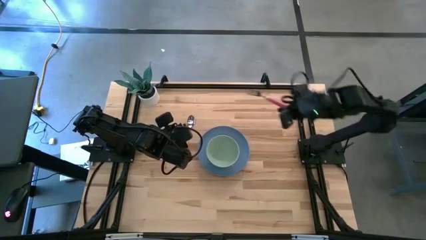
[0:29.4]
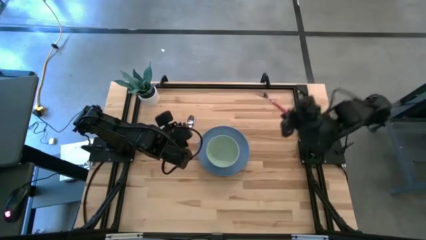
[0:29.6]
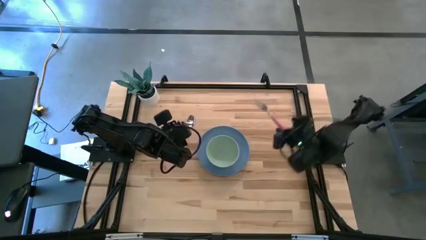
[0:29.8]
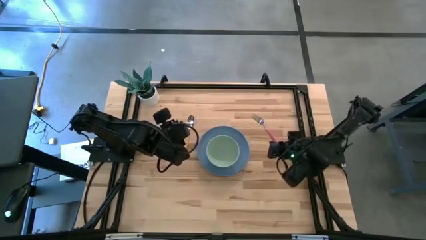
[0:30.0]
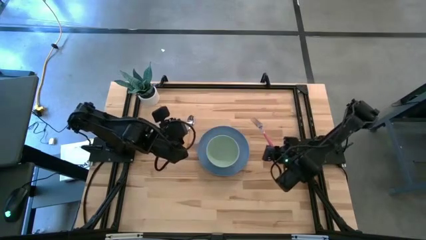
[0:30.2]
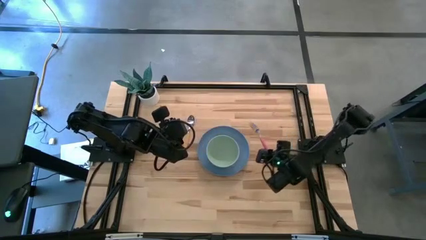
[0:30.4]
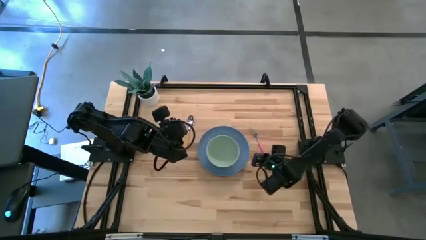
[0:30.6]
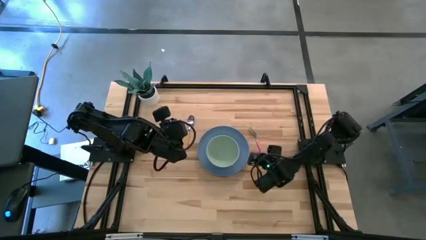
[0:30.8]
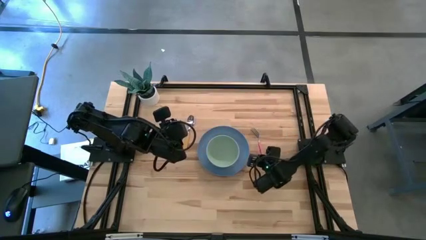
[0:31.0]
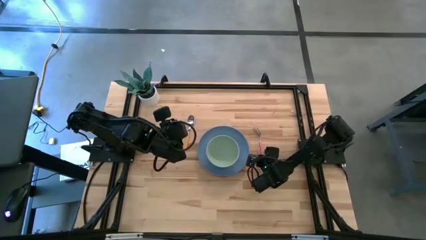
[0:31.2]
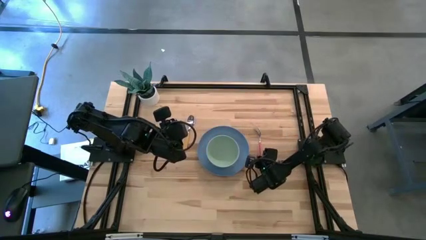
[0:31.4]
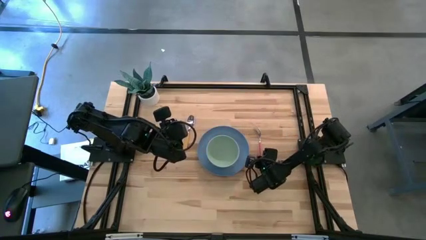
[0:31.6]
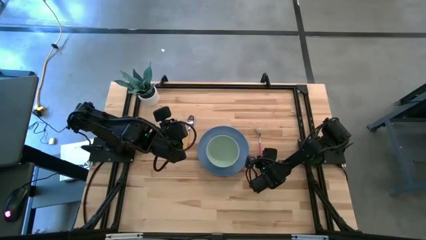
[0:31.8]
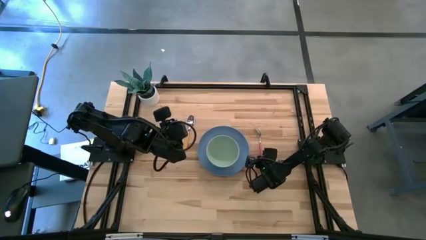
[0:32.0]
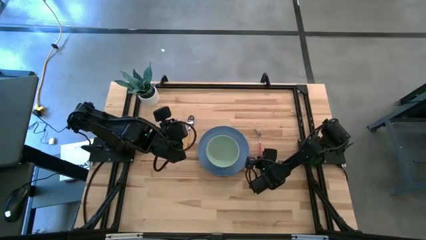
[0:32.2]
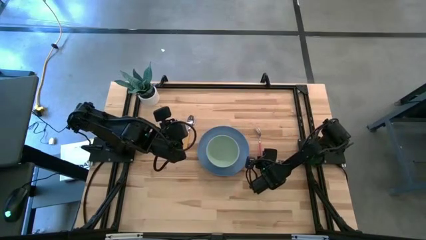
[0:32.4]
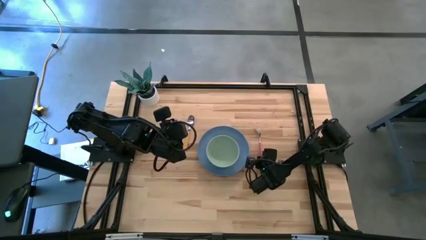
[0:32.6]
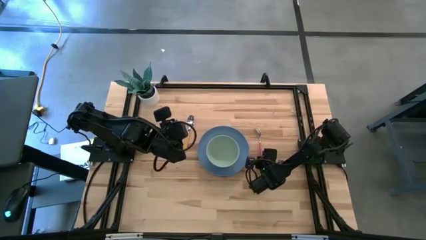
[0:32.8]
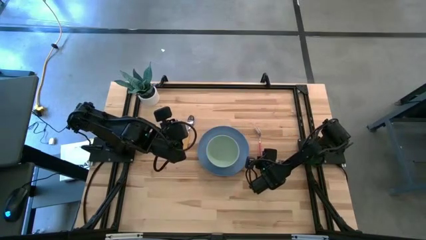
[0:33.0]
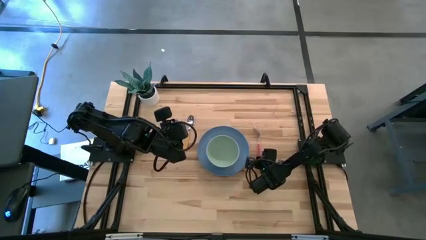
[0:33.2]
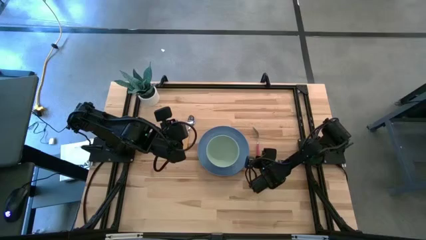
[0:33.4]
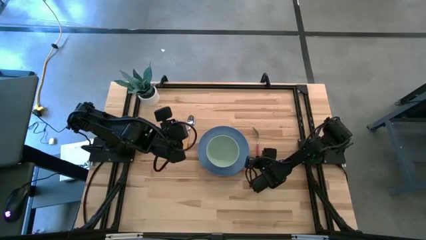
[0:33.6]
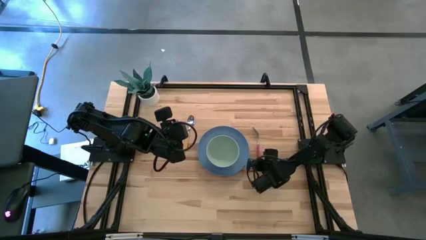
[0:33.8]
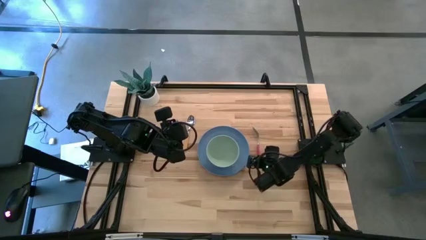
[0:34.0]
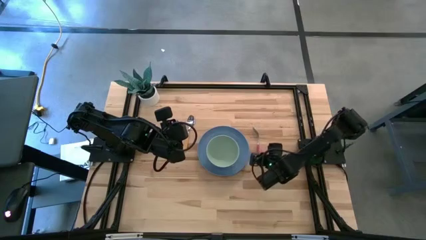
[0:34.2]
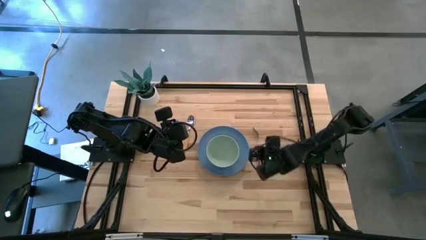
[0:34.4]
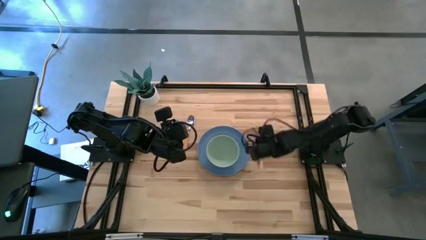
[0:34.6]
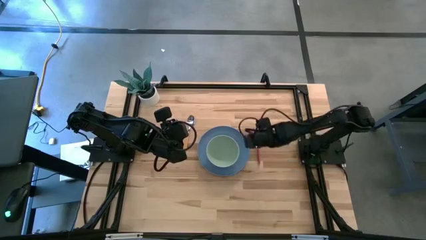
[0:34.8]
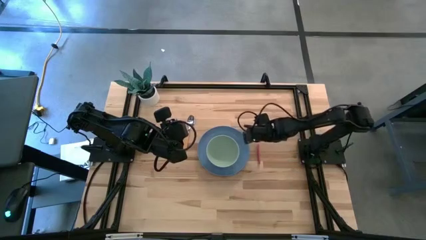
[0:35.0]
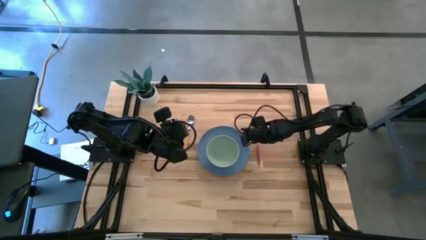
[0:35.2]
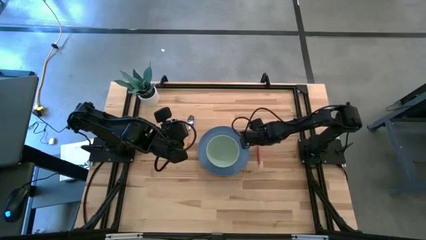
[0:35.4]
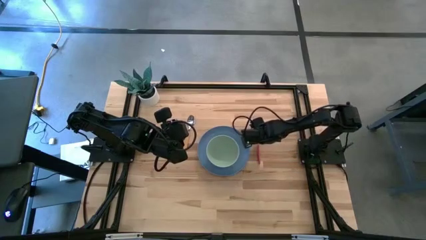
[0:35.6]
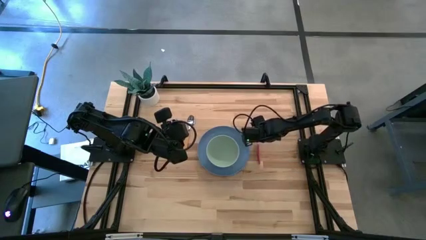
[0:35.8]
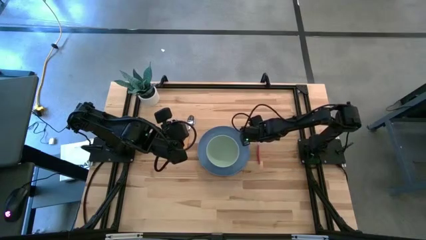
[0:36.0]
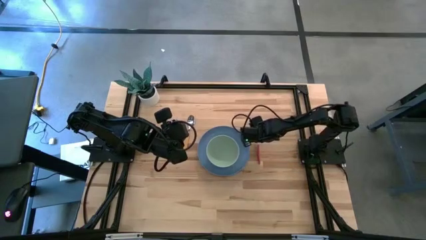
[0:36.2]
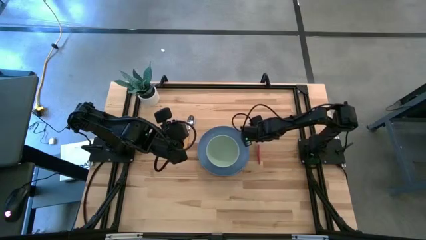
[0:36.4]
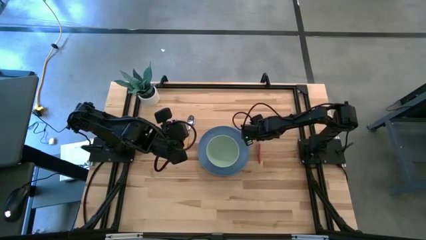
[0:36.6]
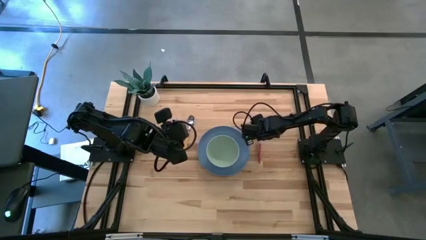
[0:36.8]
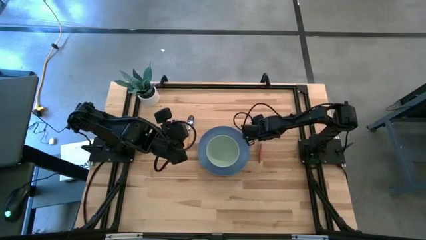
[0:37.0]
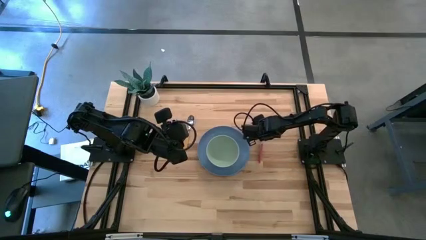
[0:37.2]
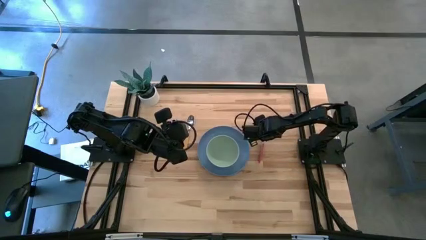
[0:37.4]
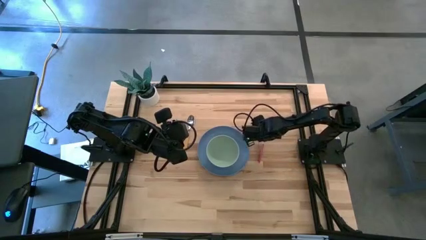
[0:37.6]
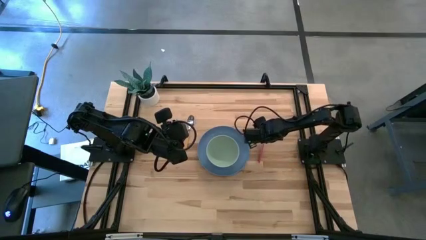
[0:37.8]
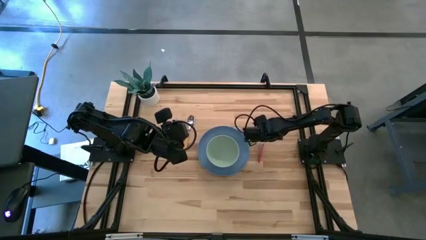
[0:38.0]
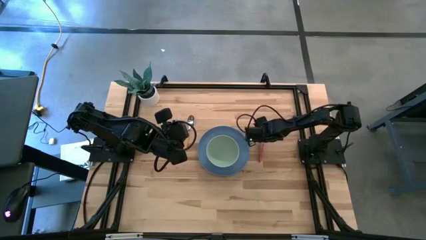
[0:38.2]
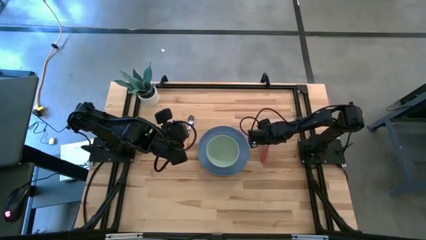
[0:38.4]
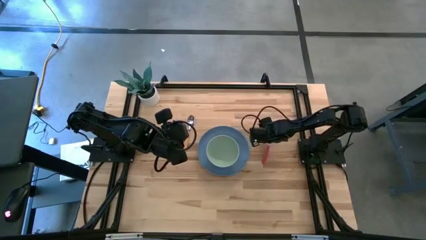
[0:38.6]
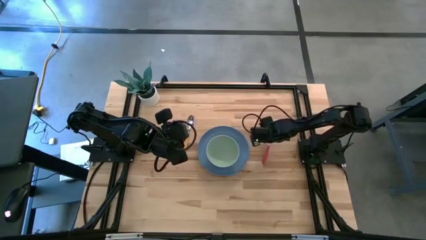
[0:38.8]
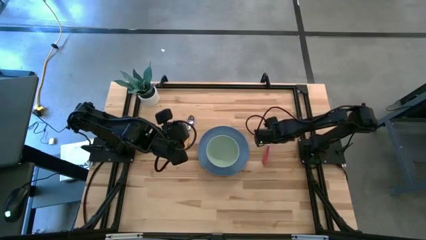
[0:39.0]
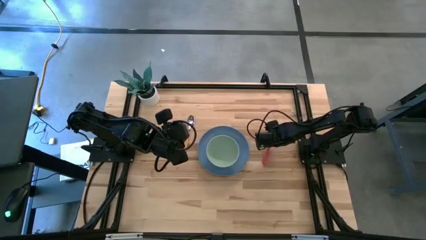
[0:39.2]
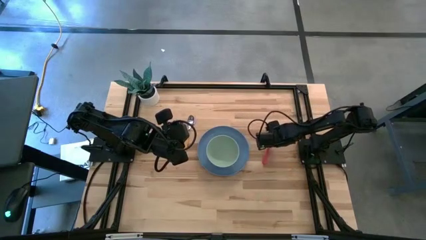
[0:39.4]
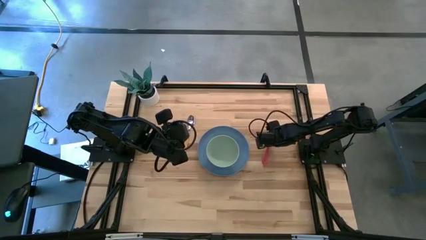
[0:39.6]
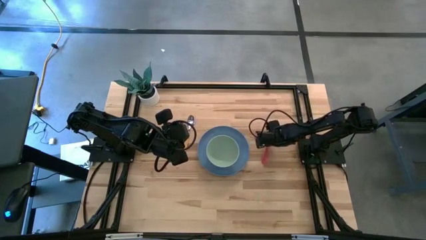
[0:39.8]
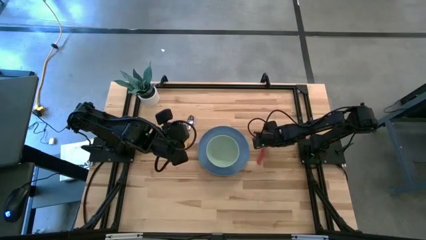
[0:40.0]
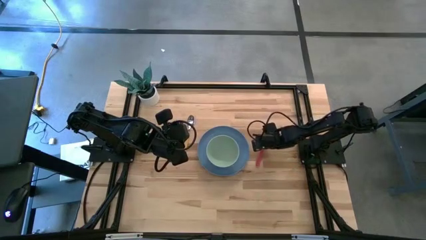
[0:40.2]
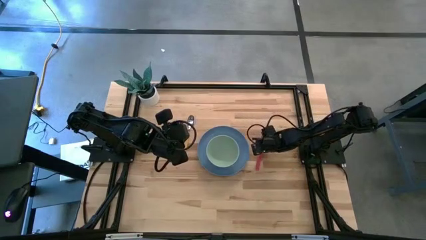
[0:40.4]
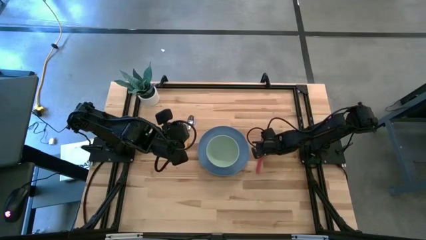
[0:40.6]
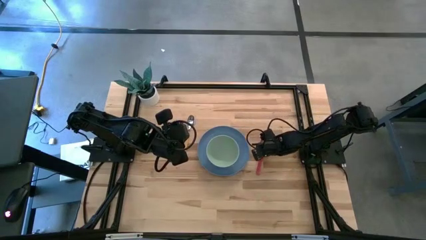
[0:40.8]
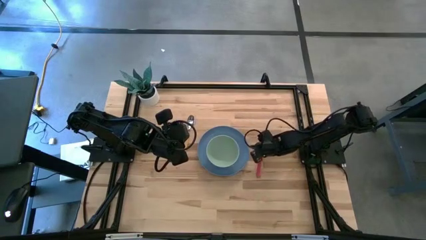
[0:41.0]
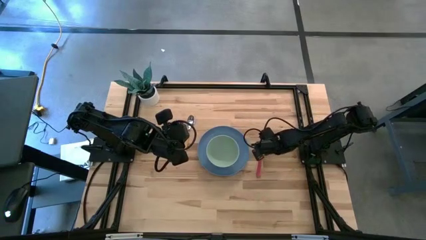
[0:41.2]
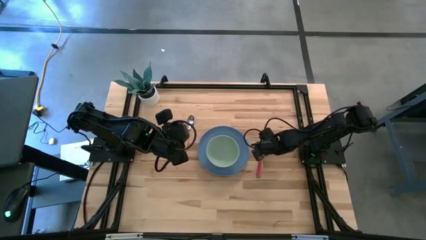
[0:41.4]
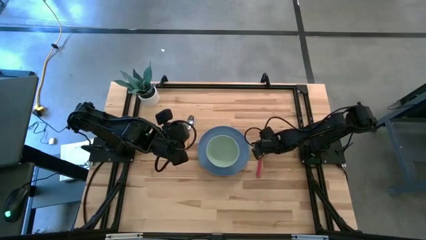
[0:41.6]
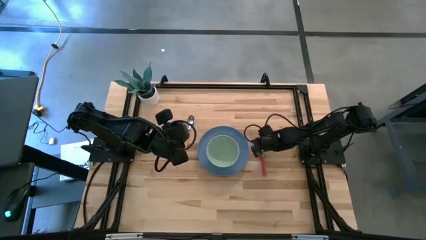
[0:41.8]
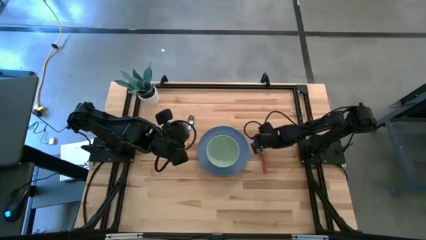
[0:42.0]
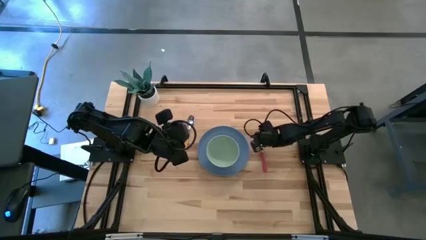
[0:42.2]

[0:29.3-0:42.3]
Task: Set table place
Put the pink fork to the right of the blue plate

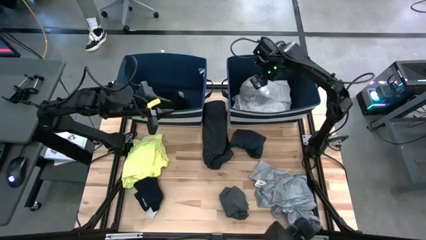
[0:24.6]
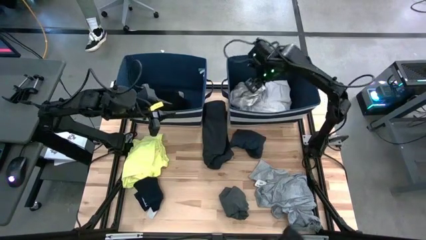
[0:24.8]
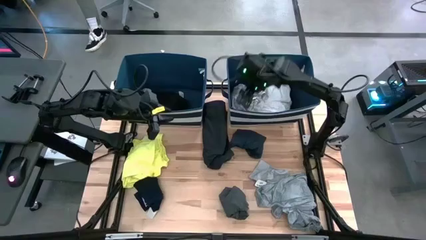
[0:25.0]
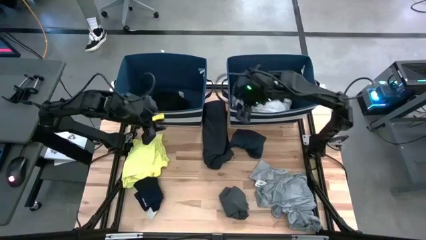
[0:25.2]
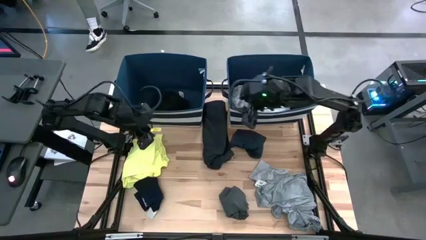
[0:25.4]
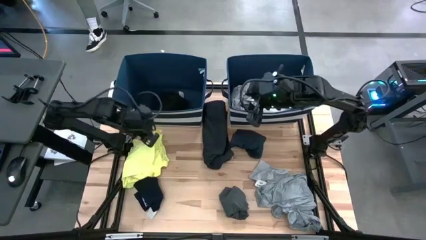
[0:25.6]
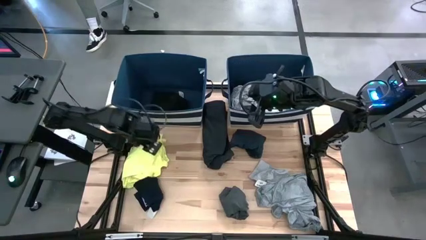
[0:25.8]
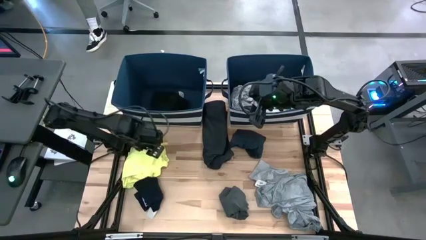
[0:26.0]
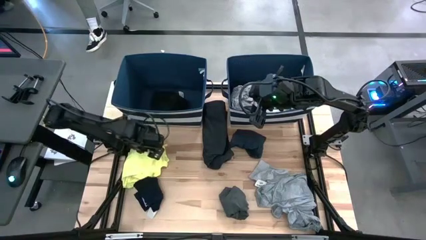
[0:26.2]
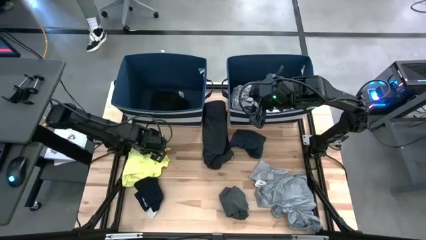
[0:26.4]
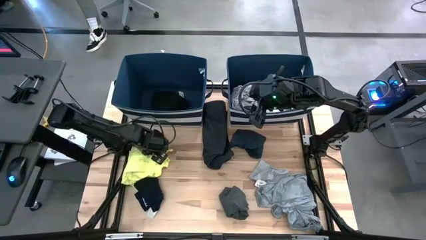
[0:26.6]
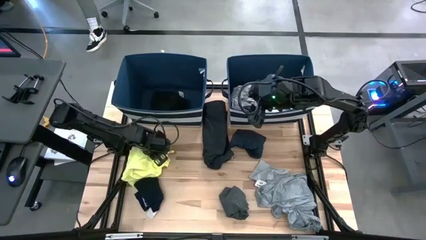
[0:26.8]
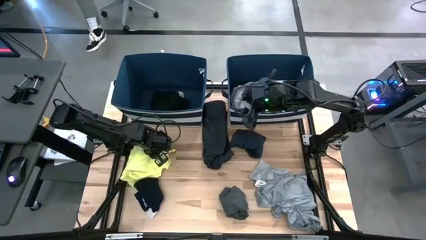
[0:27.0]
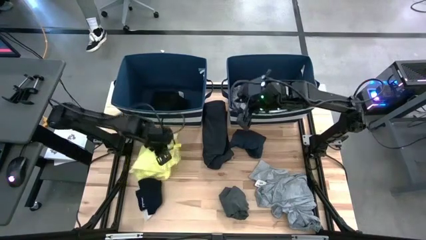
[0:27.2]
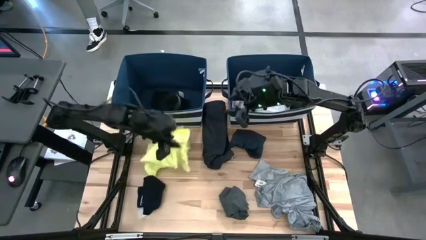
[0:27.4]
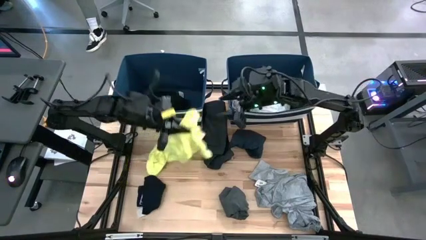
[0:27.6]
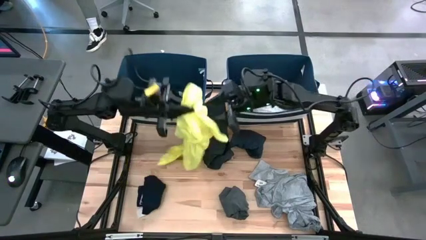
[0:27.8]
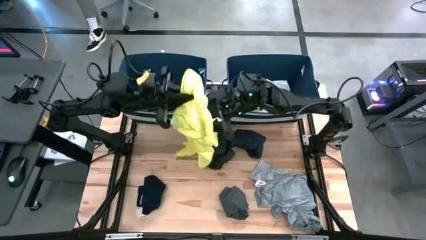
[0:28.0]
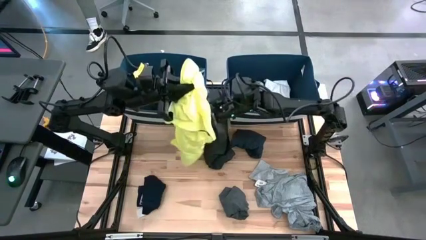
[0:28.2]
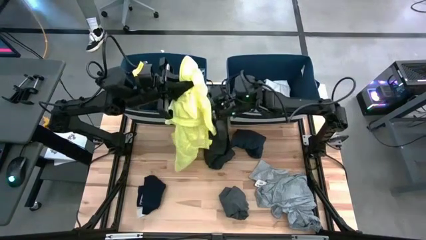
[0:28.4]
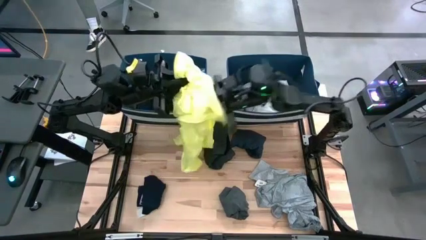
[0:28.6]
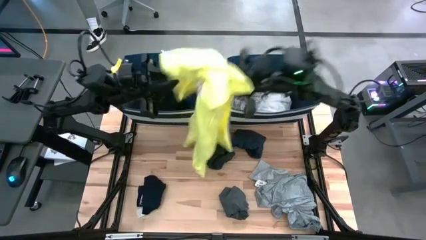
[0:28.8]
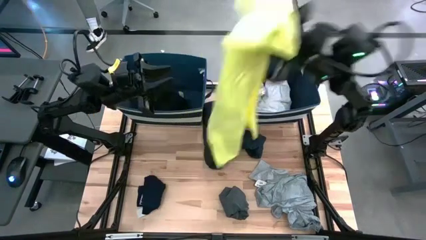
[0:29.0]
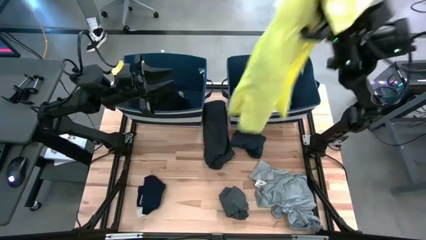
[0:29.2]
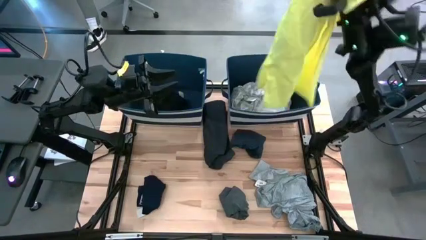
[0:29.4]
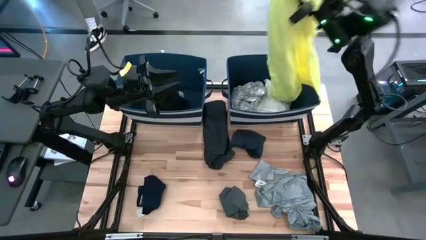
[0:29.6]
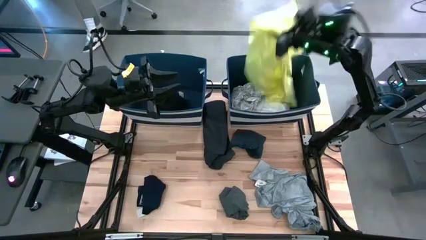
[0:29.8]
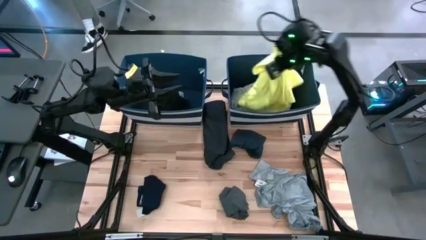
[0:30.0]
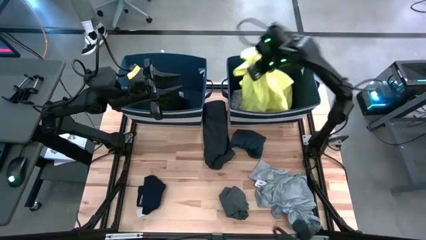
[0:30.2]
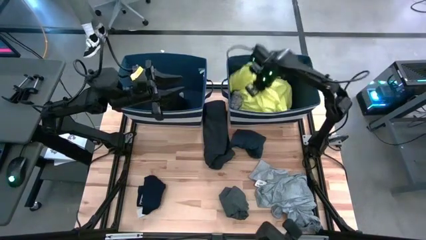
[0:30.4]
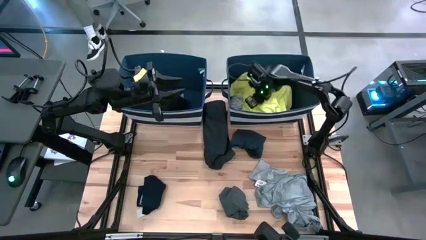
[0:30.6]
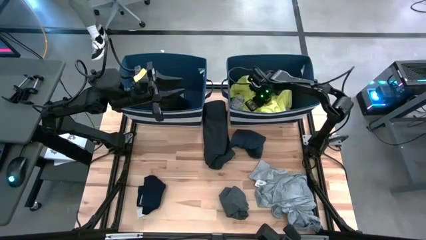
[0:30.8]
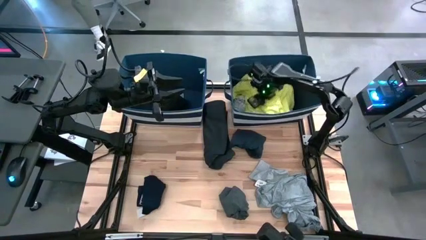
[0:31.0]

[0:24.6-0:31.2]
Task: Sort clothes
Put the yellow shirt into the right blue laundry bin
